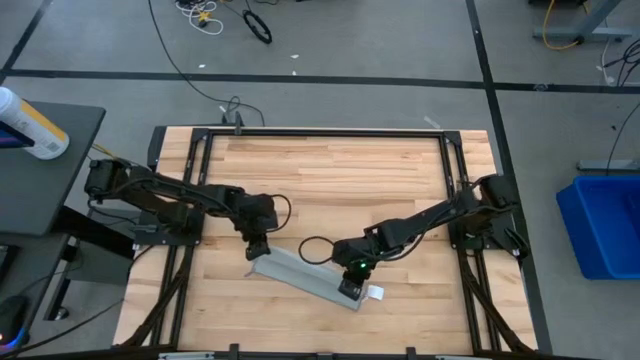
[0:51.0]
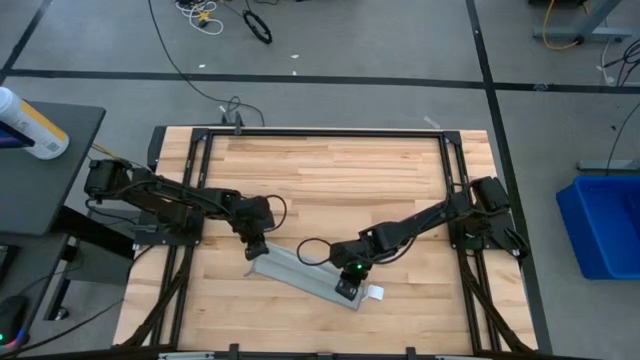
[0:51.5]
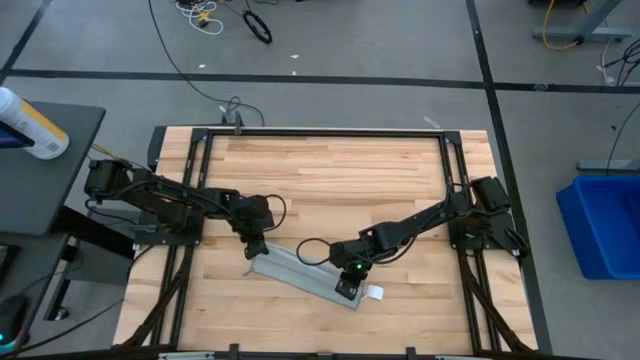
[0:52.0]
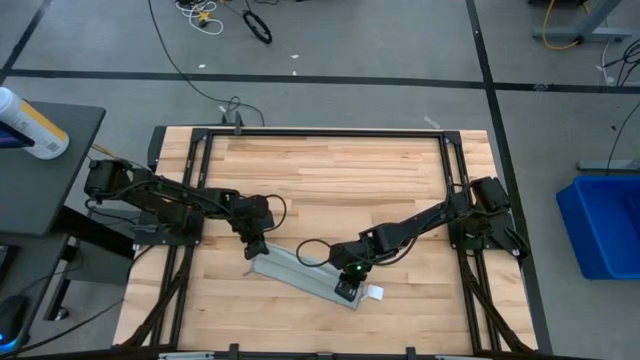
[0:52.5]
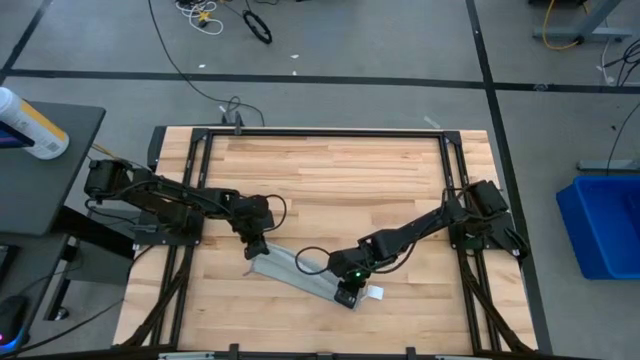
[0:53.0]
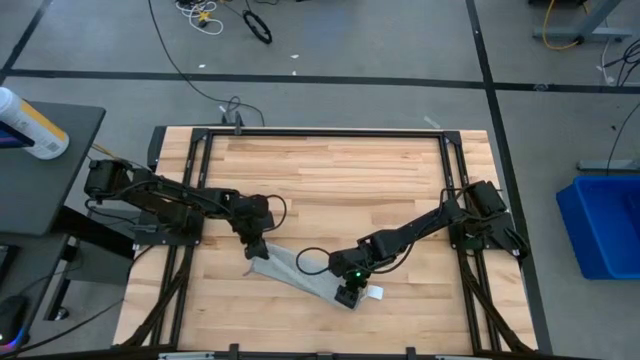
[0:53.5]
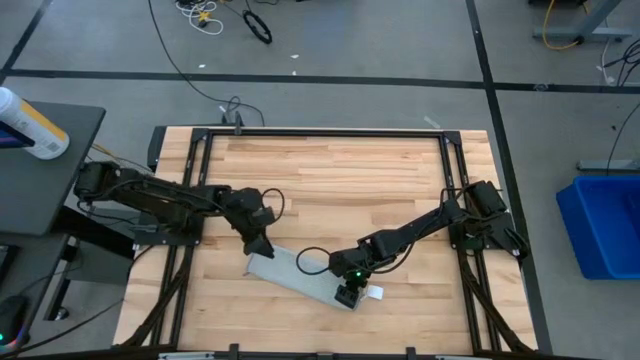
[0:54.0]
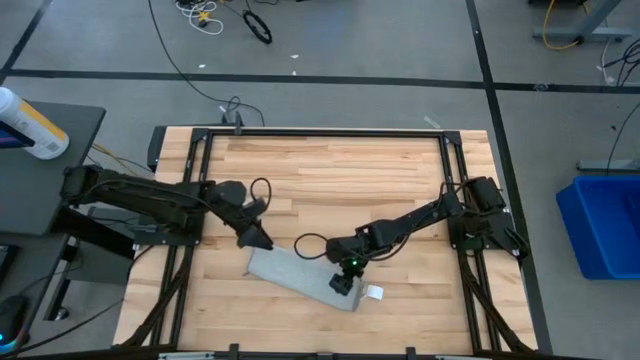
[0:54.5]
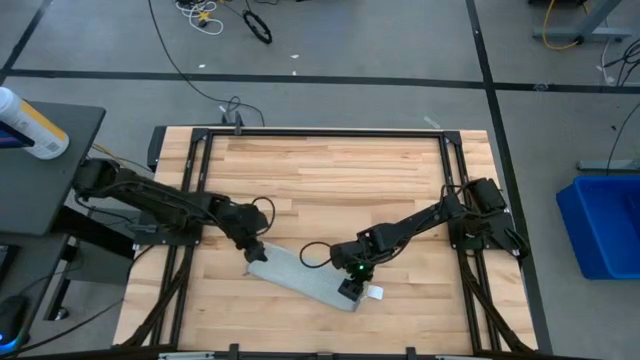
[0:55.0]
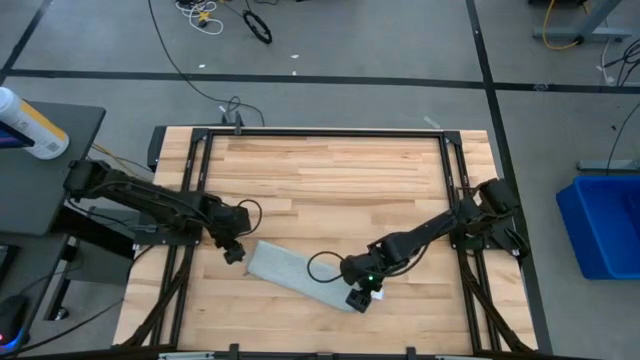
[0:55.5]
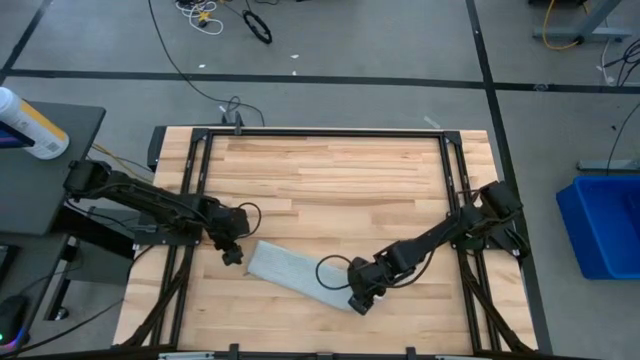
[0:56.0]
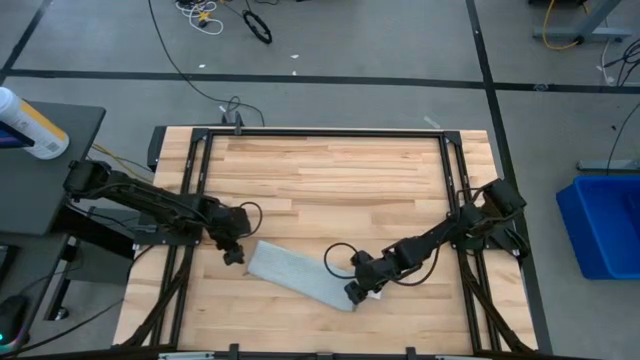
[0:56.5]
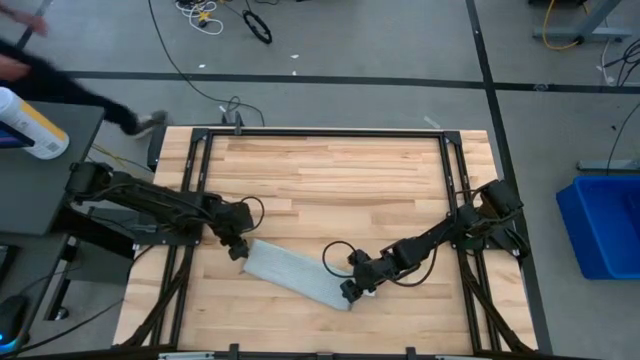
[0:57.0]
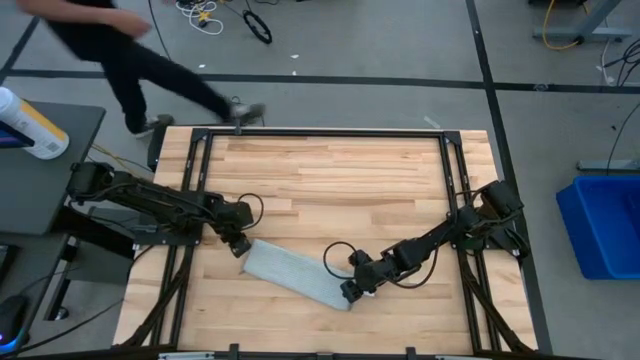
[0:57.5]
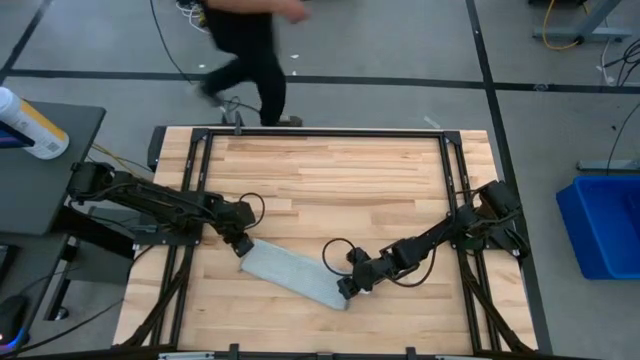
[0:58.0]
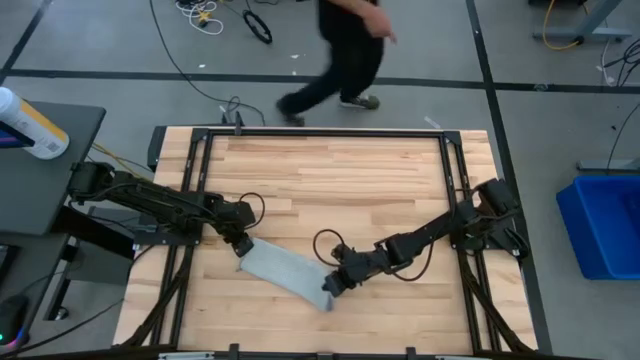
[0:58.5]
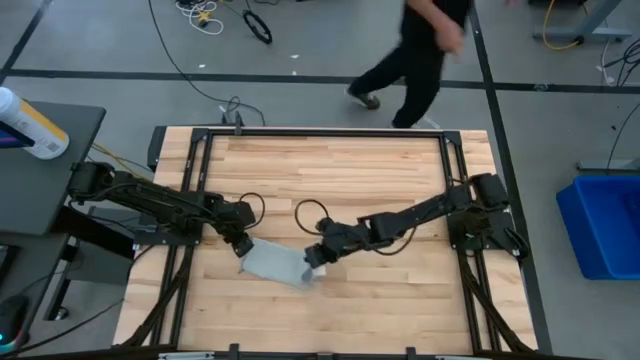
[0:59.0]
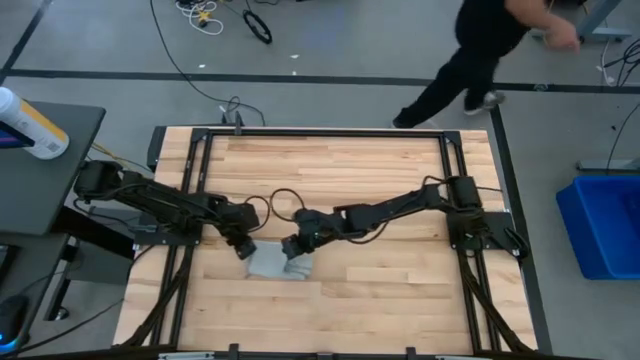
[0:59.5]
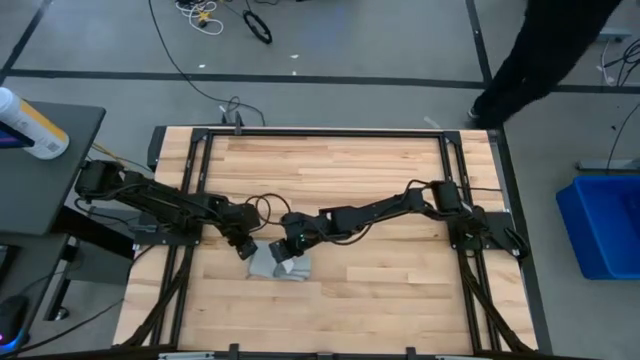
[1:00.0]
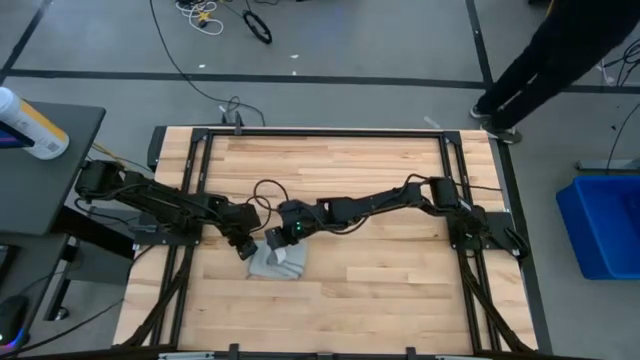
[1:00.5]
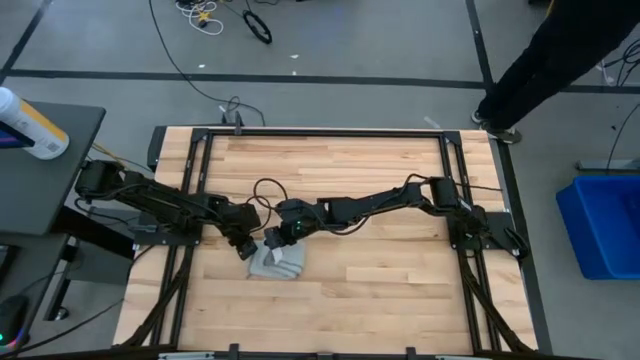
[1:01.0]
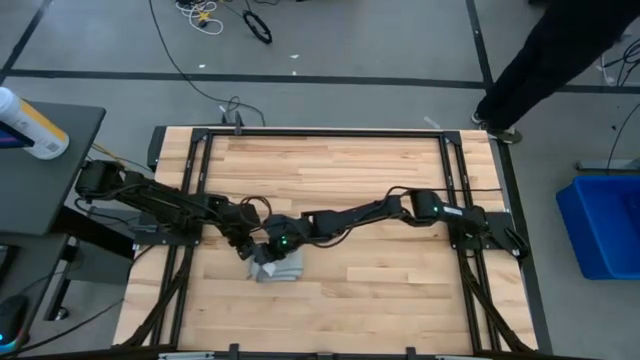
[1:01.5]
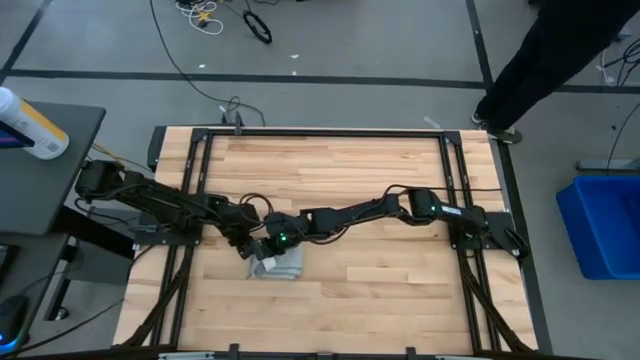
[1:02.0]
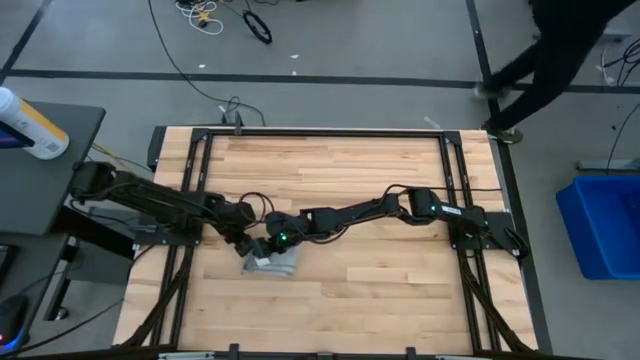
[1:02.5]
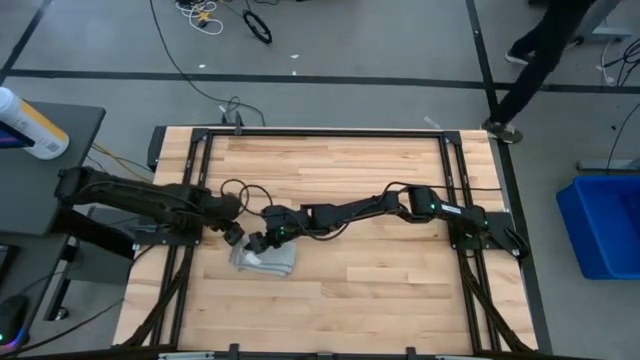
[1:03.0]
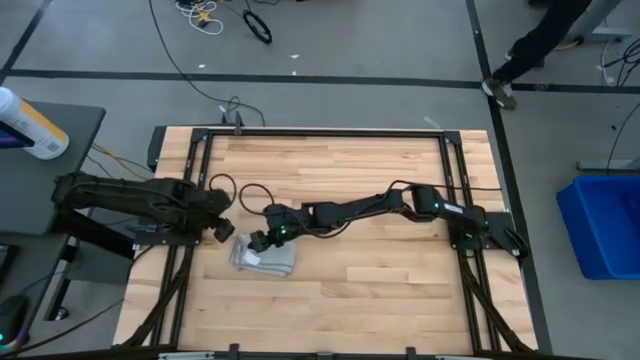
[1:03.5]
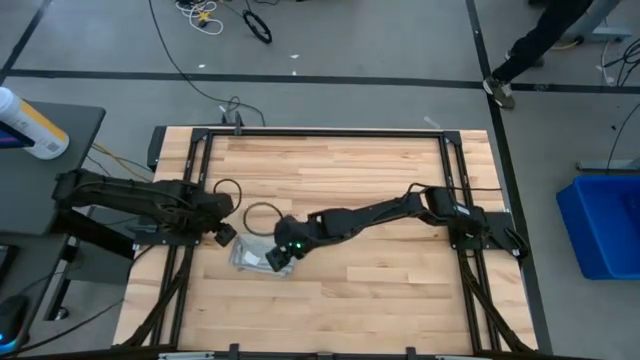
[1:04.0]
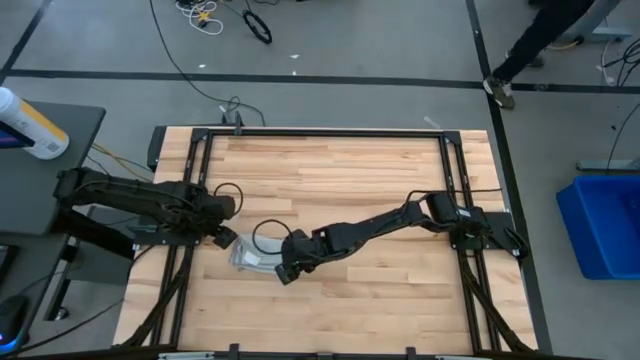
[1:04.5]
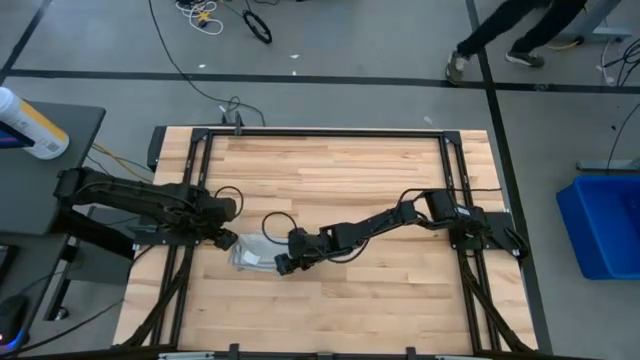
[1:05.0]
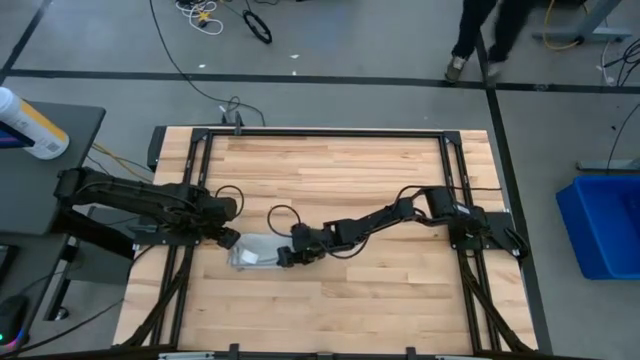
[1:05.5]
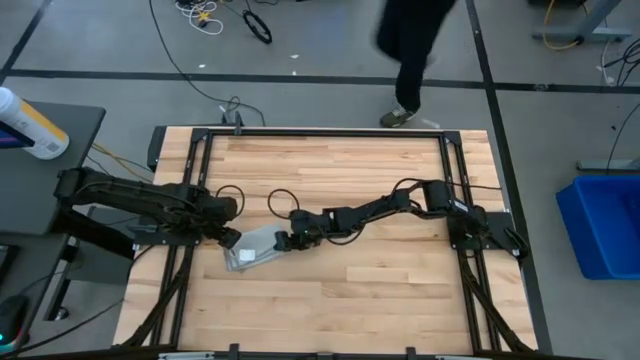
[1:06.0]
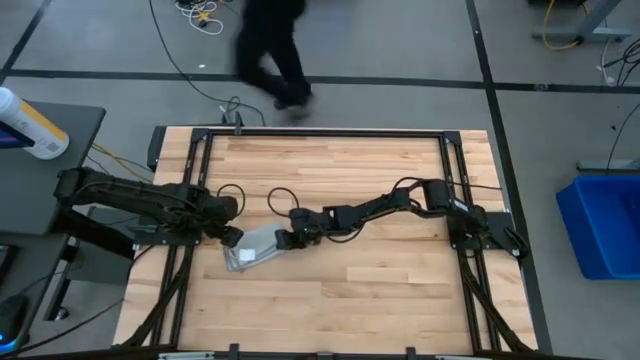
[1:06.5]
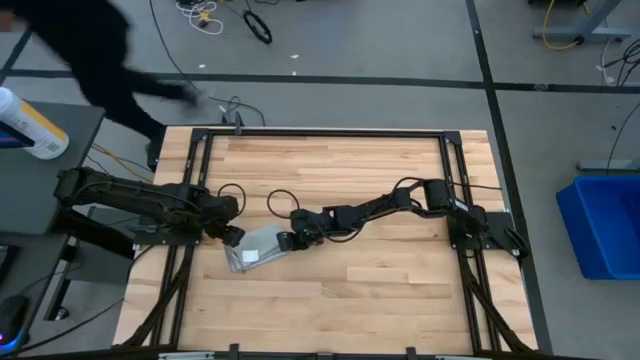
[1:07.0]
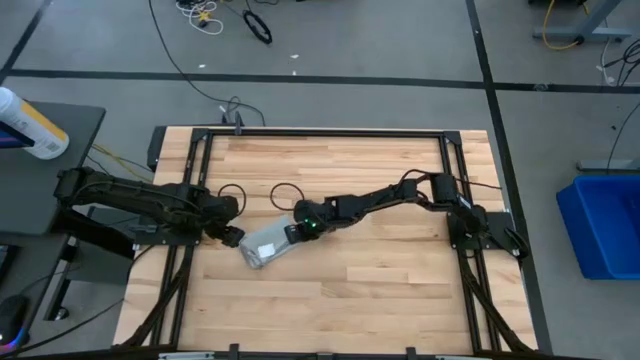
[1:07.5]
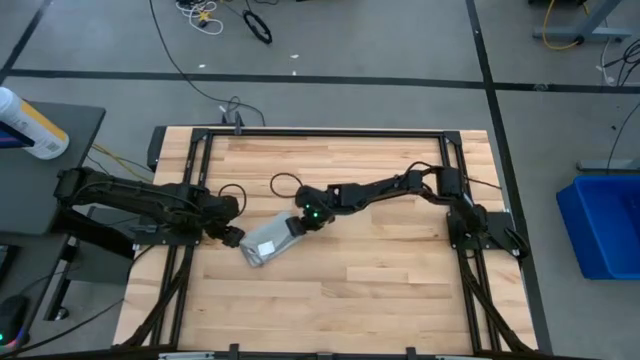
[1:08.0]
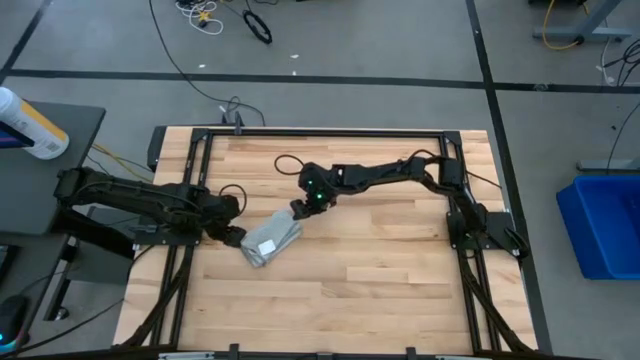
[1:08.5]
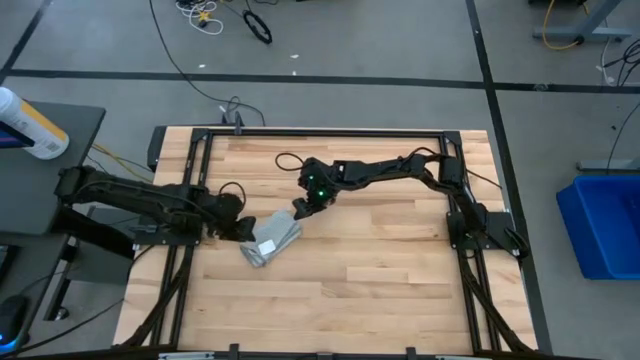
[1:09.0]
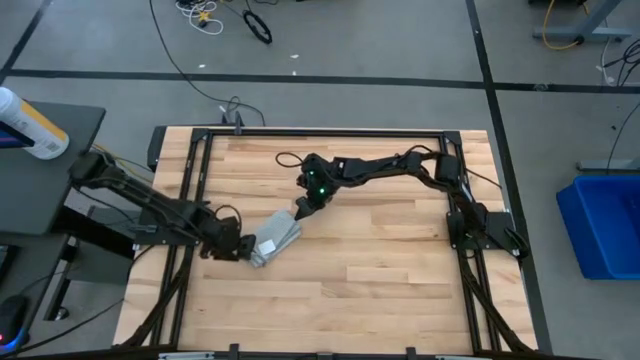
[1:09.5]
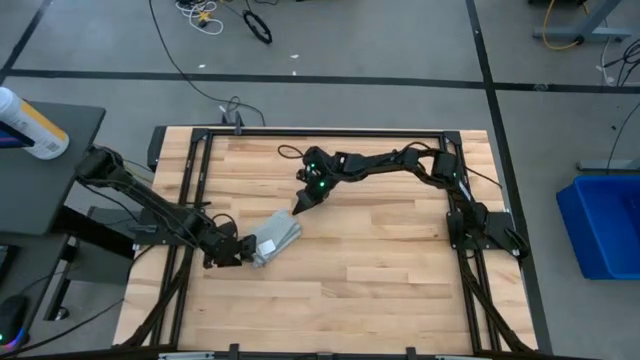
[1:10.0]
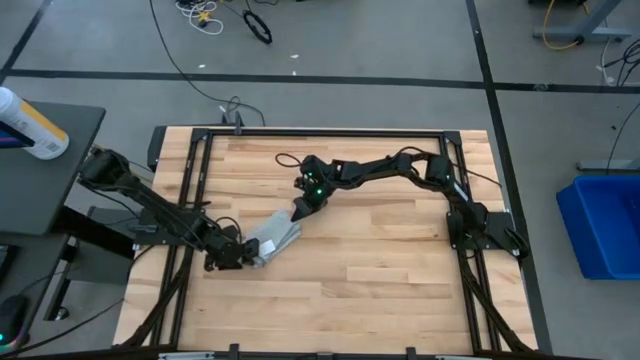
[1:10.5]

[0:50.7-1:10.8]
Task: Fold microfiber towels
Fold the grey towel

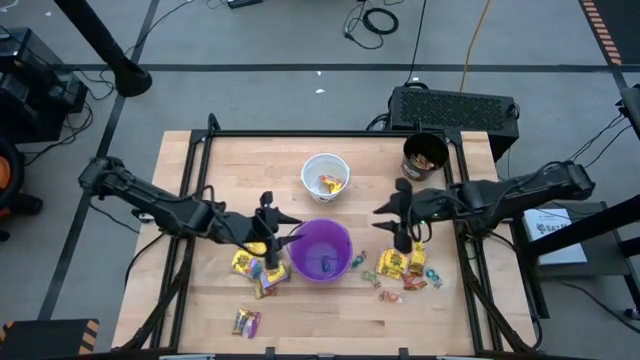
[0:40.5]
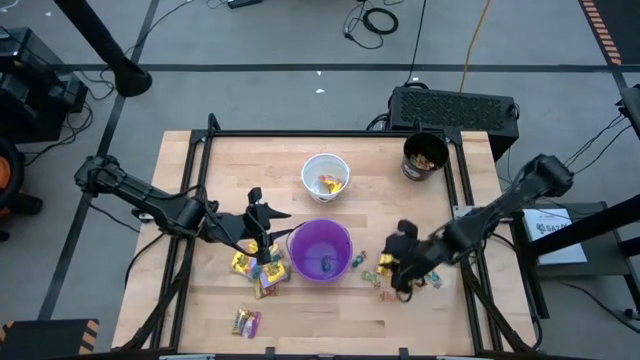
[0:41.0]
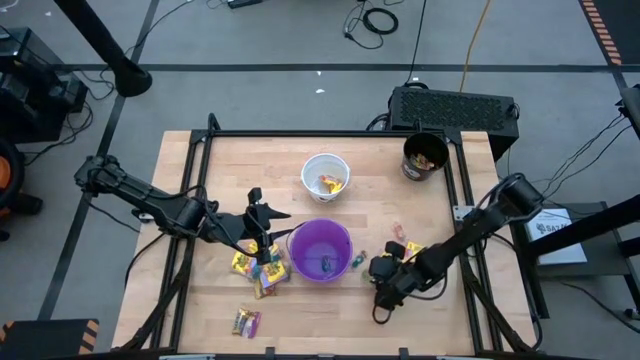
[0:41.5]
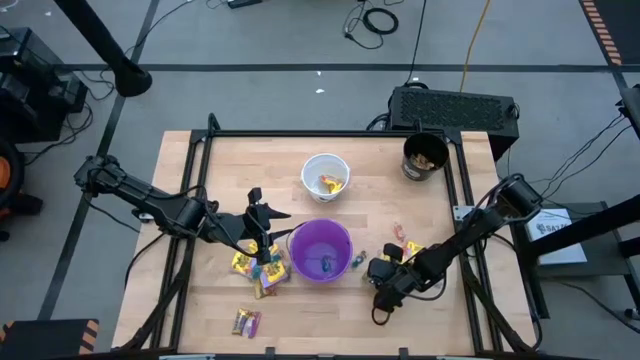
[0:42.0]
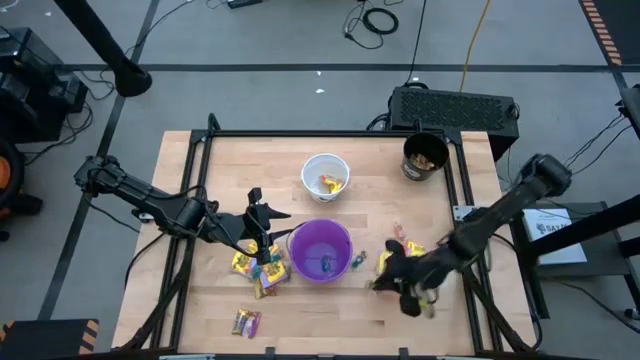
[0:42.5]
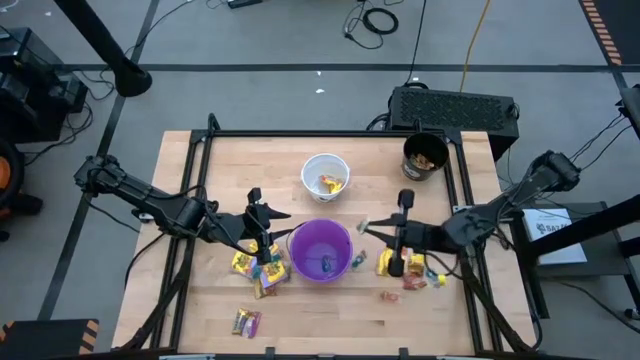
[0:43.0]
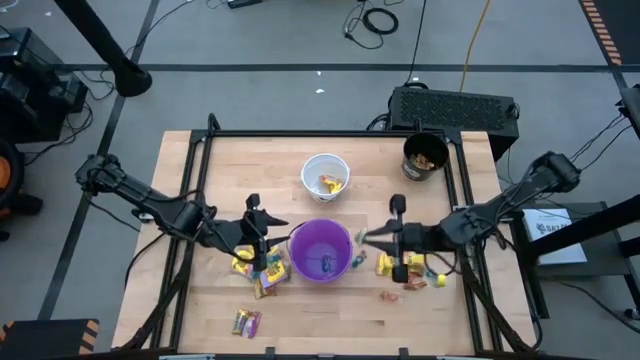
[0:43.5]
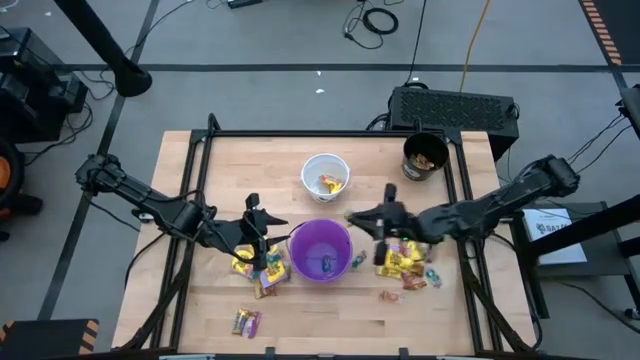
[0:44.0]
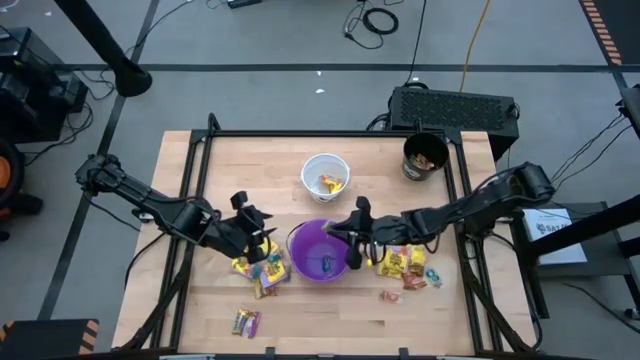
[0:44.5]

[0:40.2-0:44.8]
Task: Sort candy by brand, put in halloween buckets
Put the green gummy into the violet bucket
